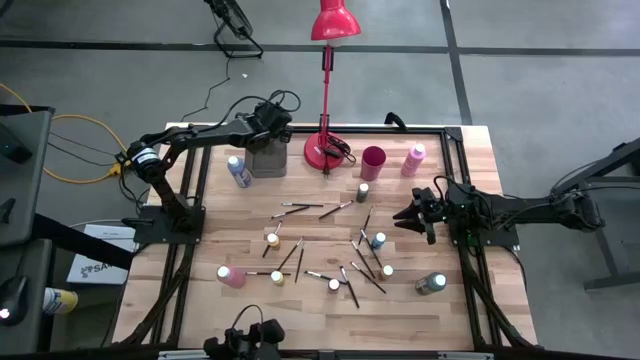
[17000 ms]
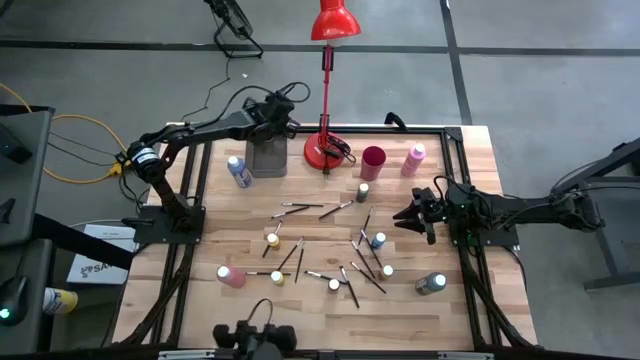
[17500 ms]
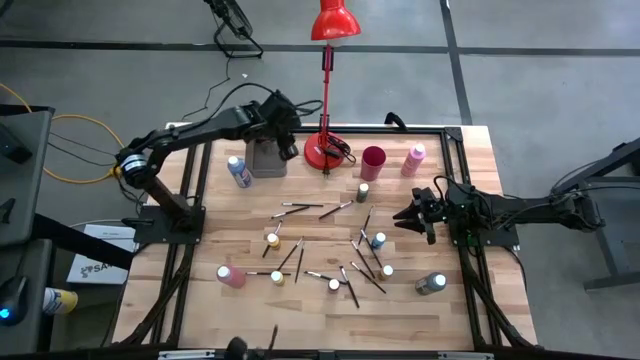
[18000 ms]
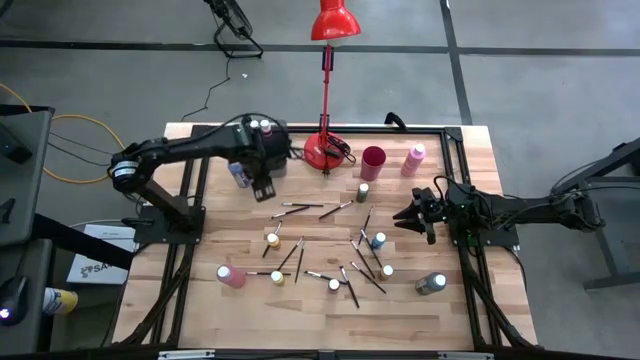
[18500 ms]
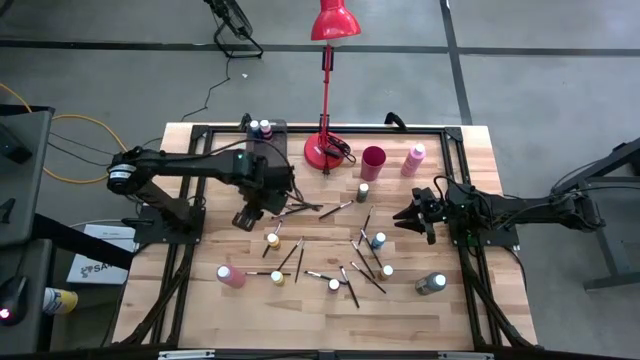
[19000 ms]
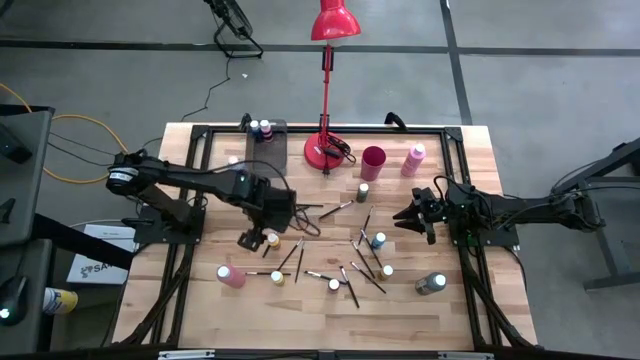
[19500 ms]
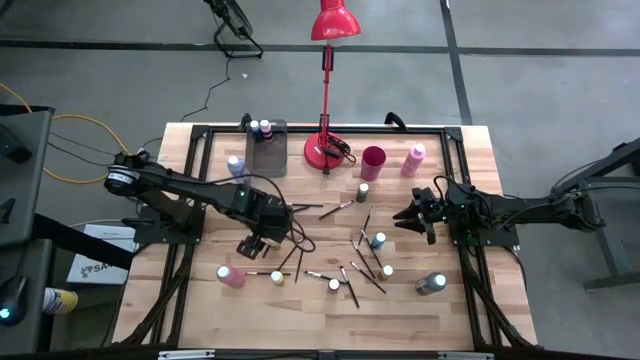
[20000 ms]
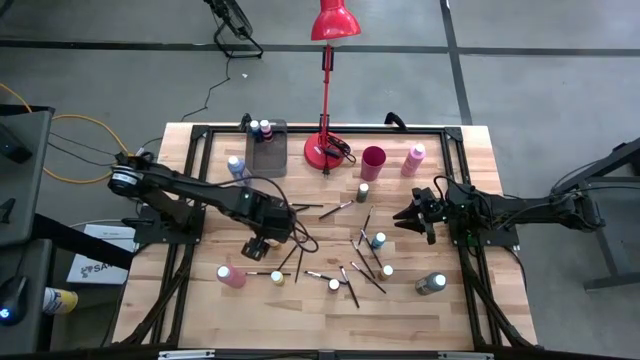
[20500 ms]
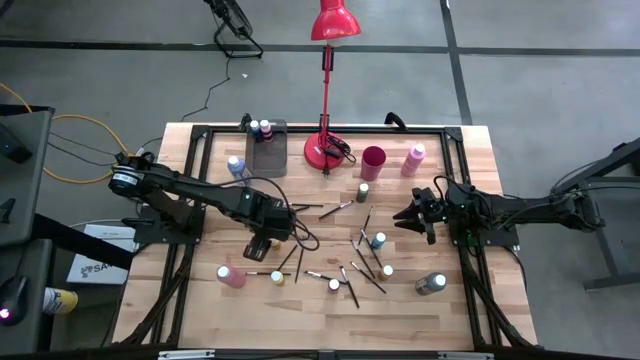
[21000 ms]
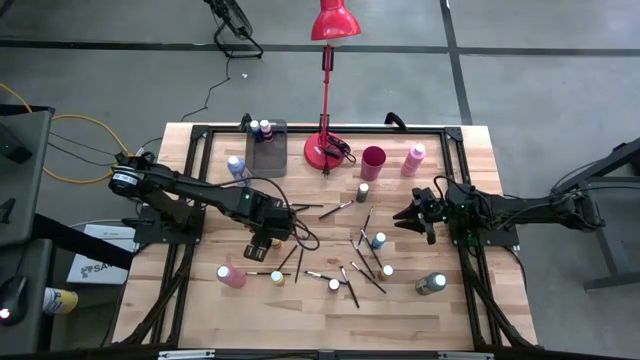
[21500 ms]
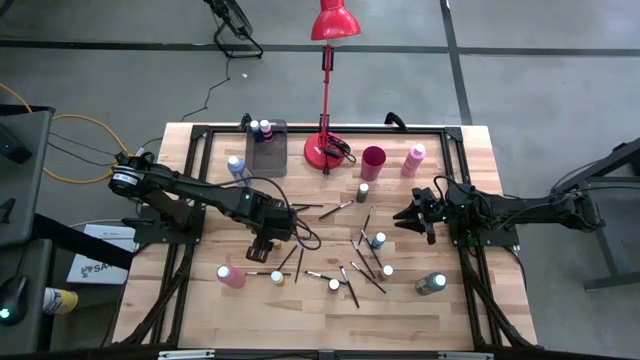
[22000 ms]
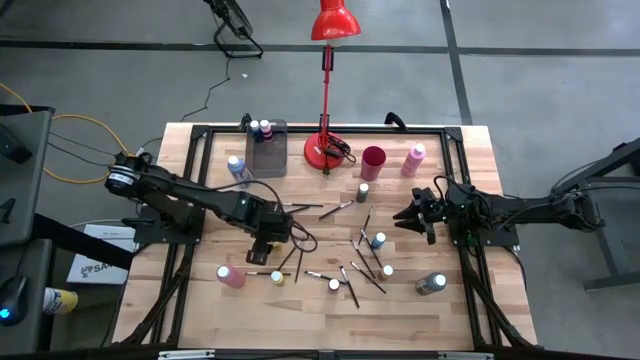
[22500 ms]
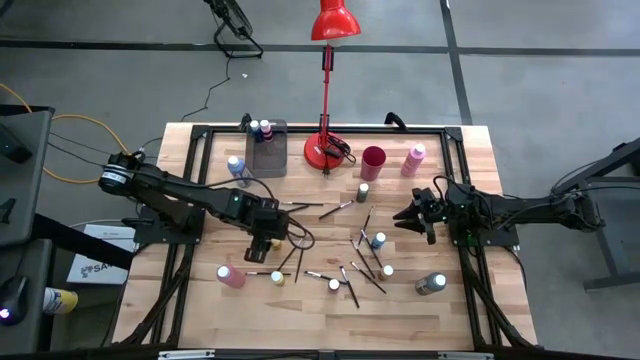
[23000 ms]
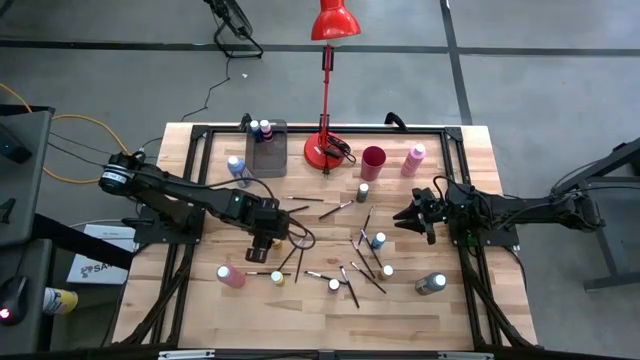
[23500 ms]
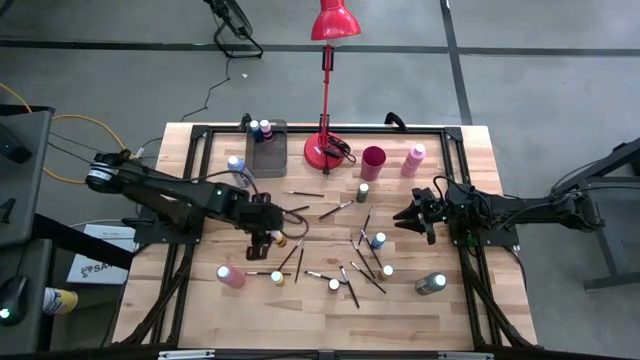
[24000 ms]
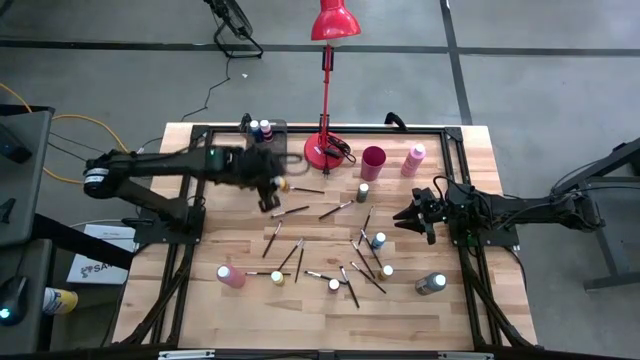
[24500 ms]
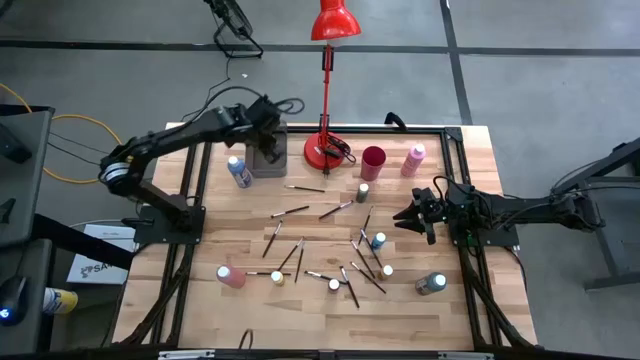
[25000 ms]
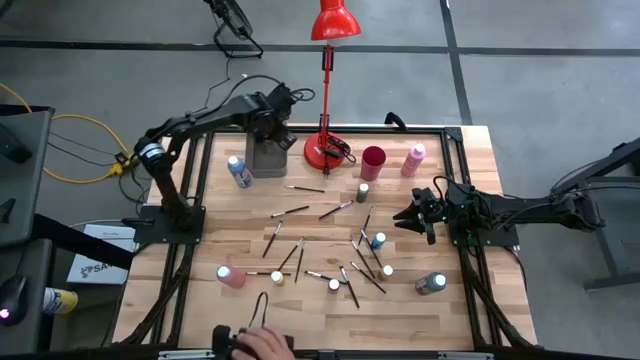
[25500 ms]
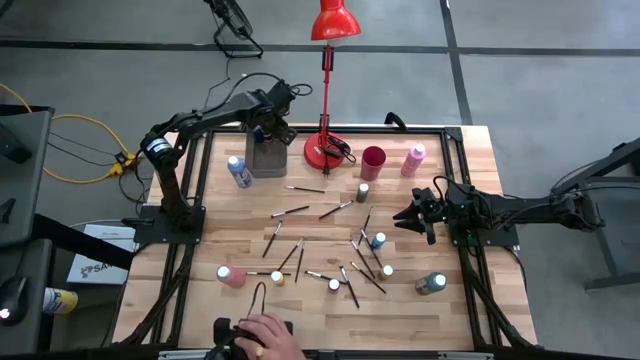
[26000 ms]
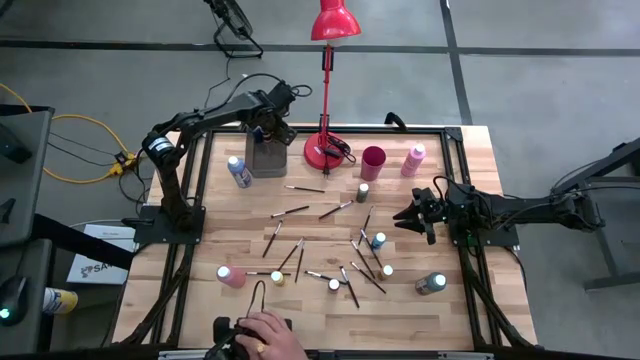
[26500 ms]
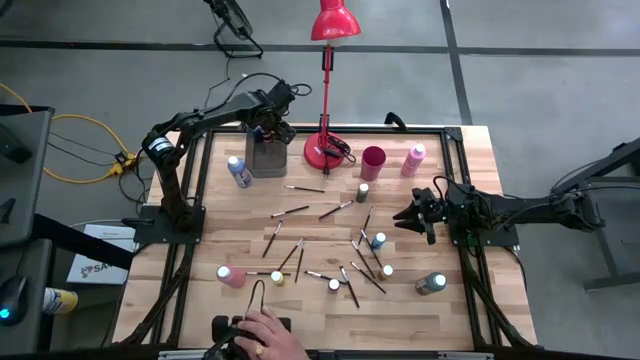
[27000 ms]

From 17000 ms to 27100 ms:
Task: Pick & Place Paint Supplies
Put the small yellow black paint bottle into the bin

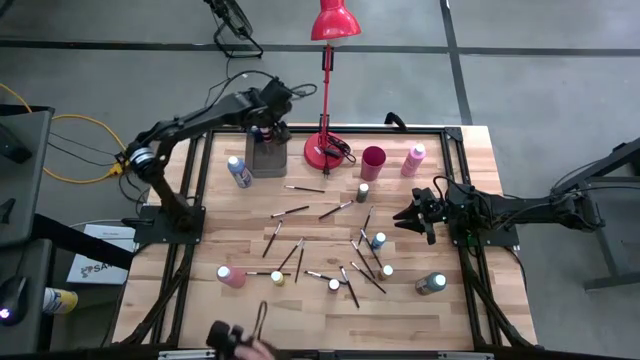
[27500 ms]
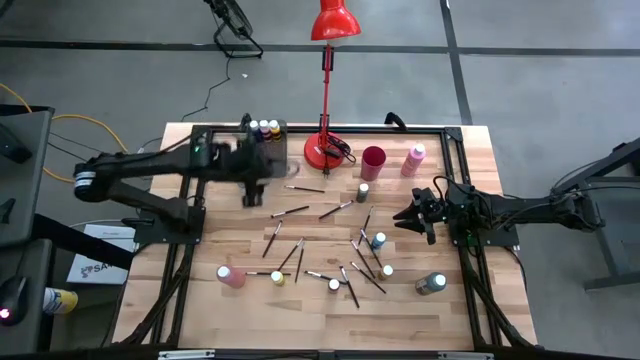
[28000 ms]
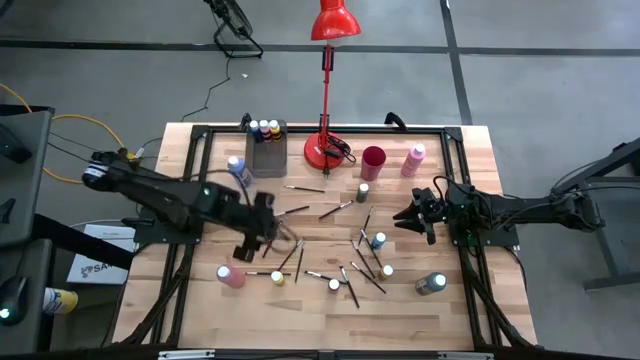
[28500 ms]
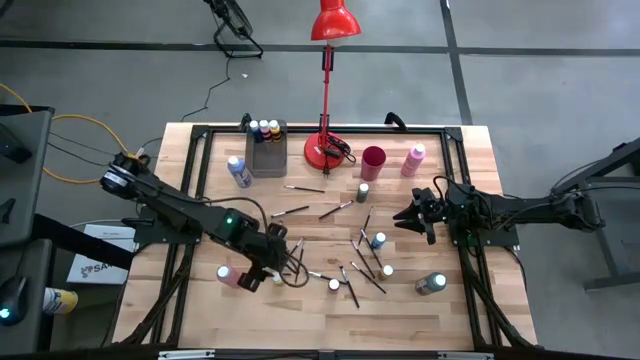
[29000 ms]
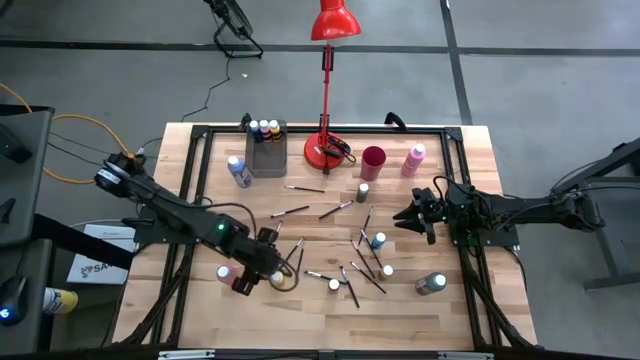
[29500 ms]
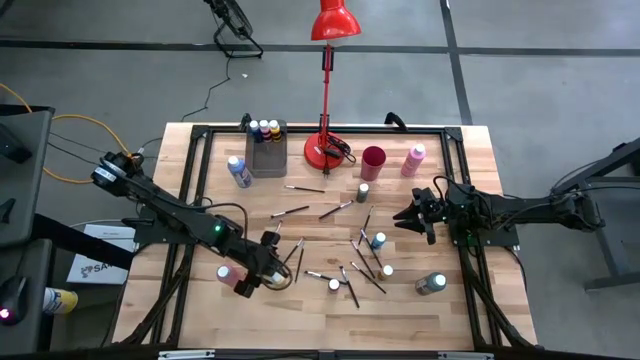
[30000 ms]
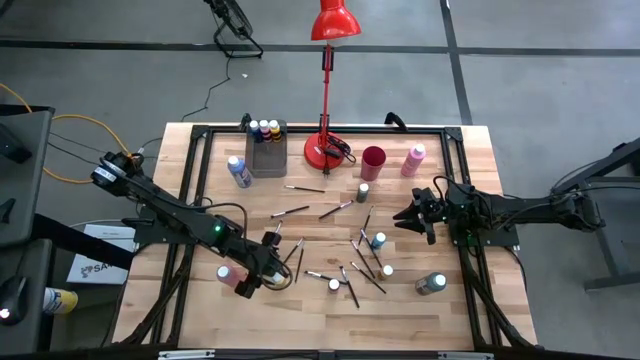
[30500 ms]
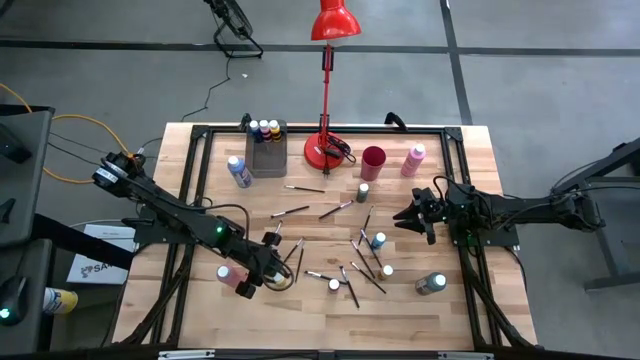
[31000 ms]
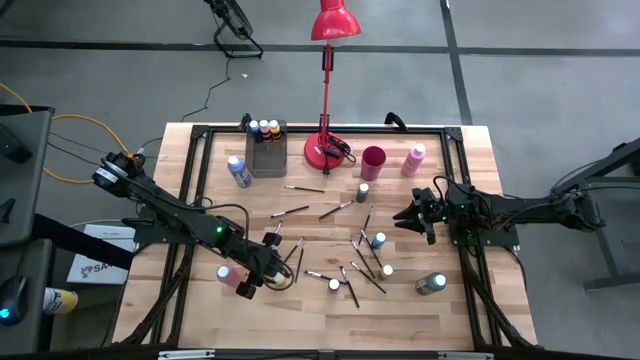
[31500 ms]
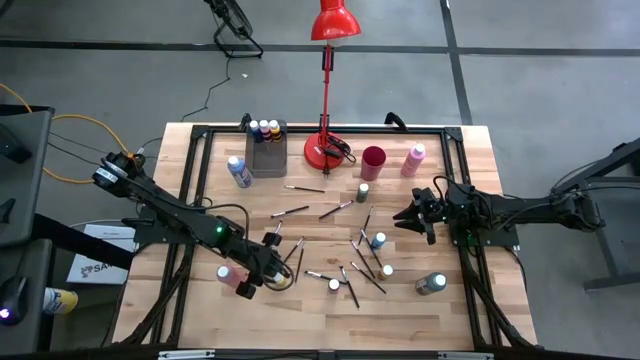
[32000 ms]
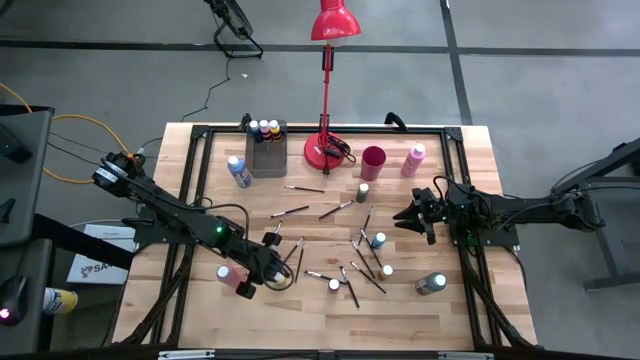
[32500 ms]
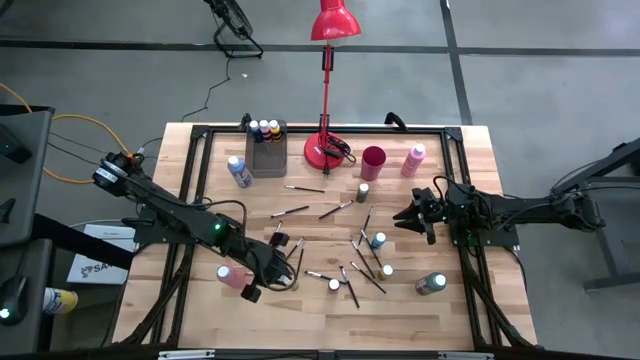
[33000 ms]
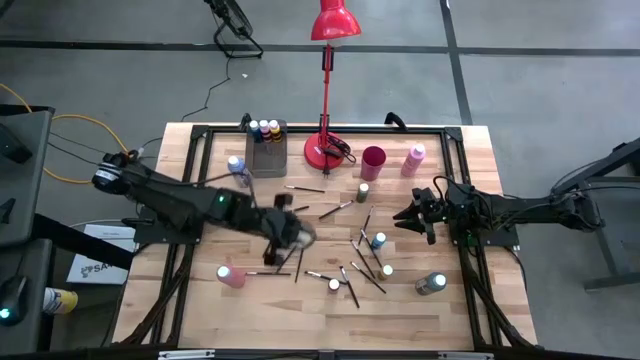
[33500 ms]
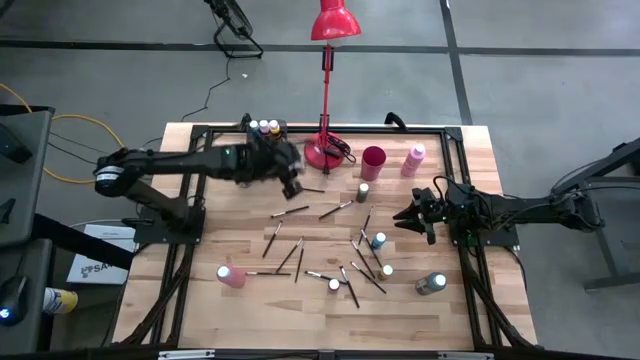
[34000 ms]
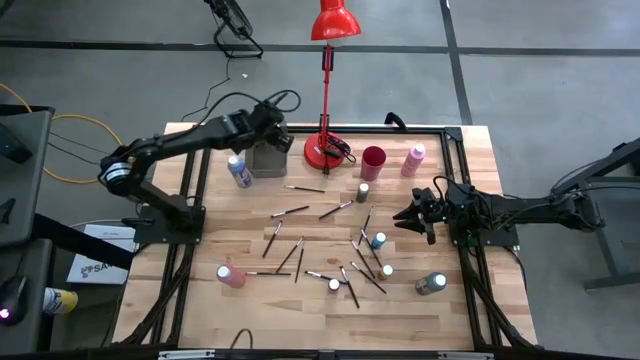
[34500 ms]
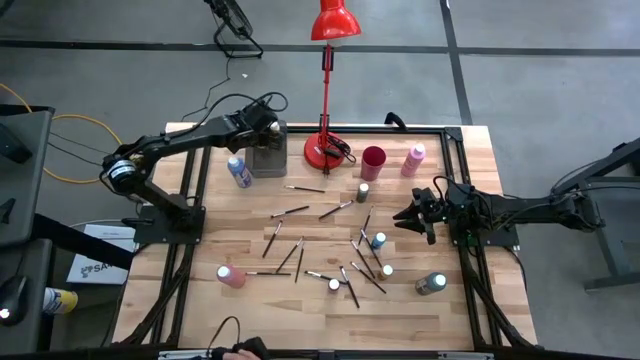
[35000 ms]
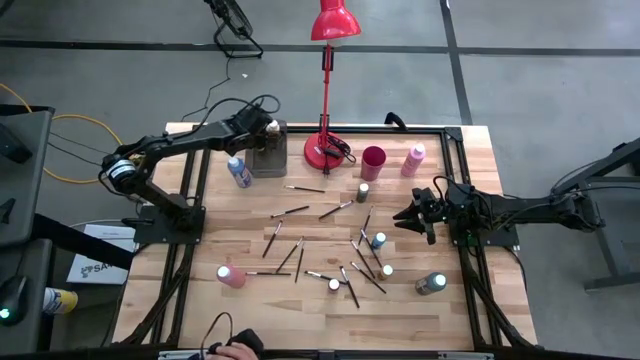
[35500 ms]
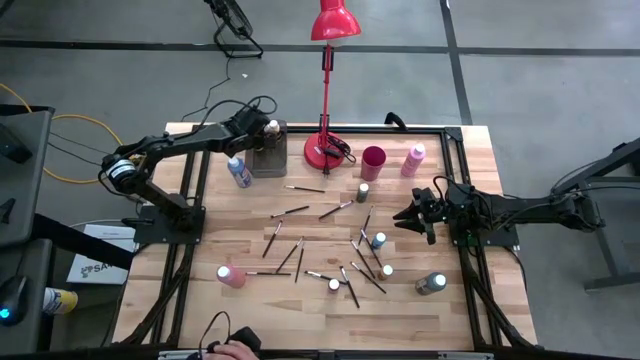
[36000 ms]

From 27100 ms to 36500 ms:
Put the small light yellow black paint bottle into the bin

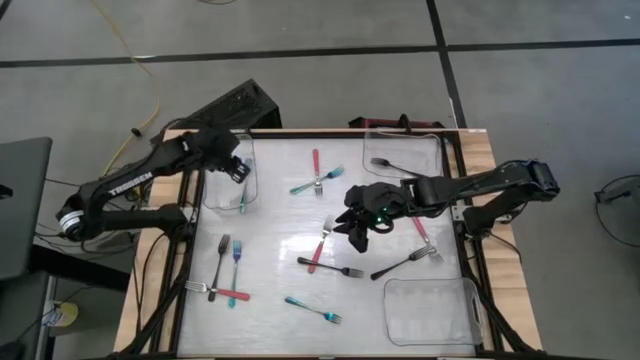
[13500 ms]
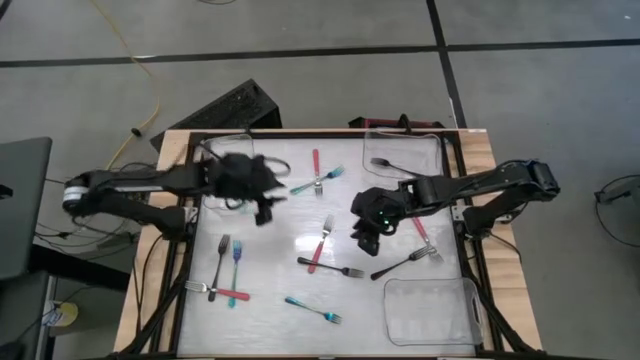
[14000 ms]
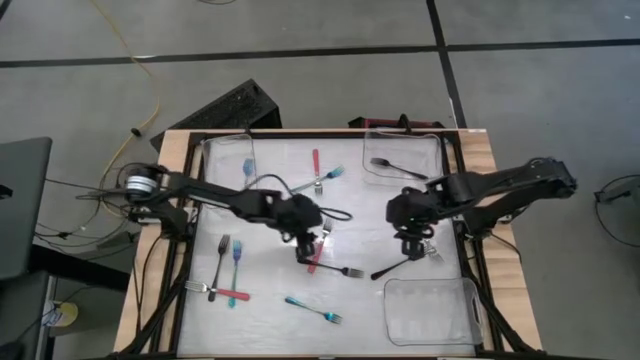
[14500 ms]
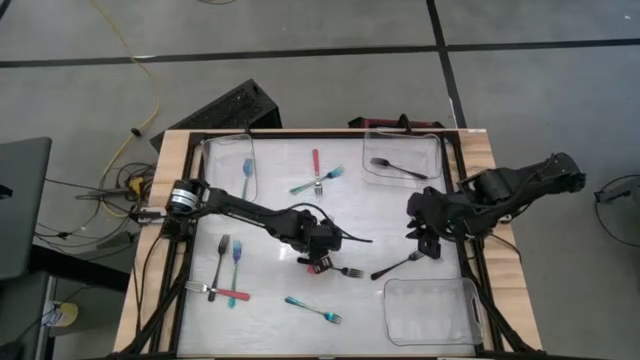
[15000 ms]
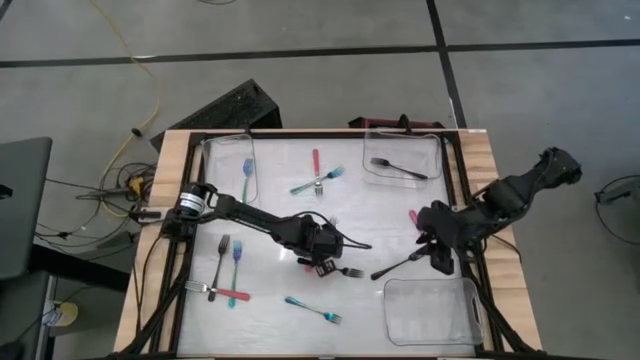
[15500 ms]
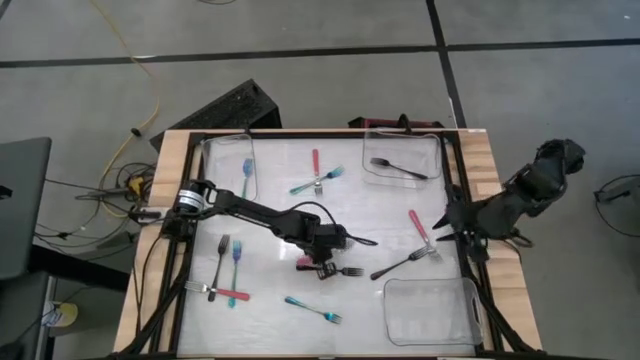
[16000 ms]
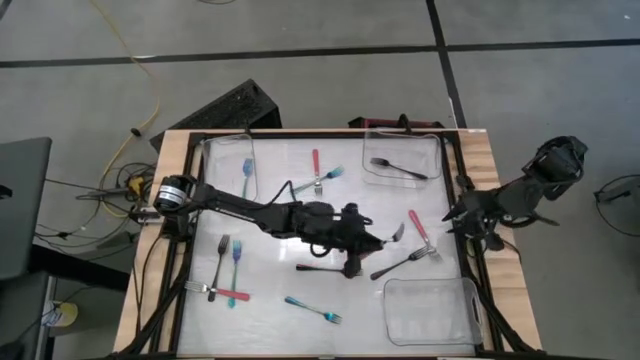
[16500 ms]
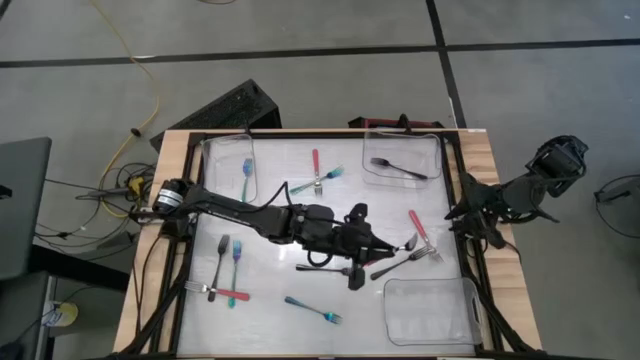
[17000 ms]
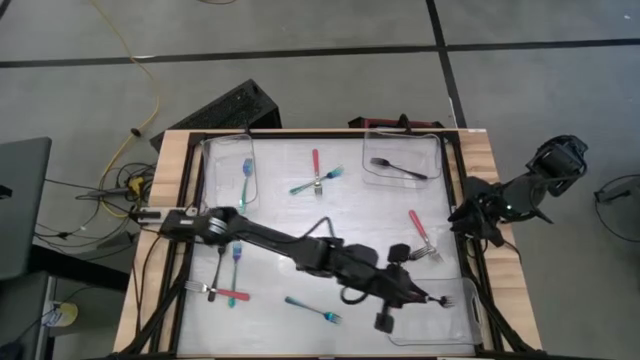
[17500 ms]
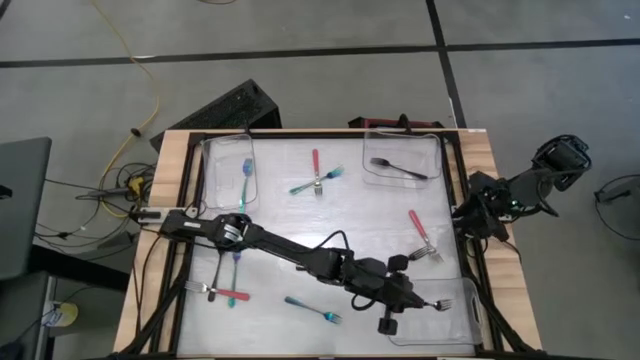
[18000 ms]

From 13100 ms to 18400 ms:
Task: Sort silverware by color (type)
Put the pink fork into the bottom right transparent bin
